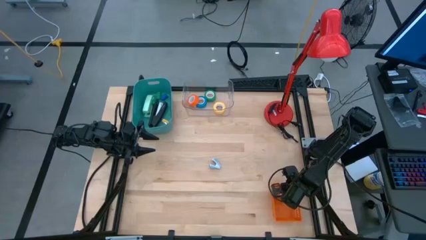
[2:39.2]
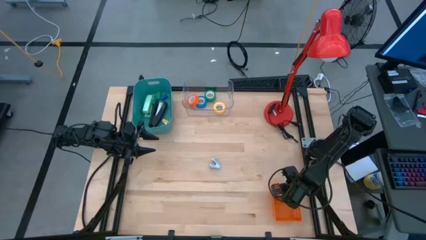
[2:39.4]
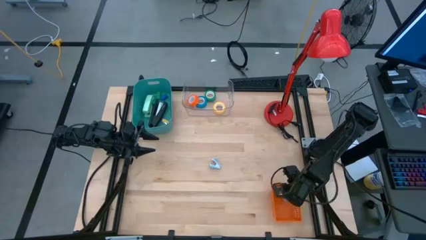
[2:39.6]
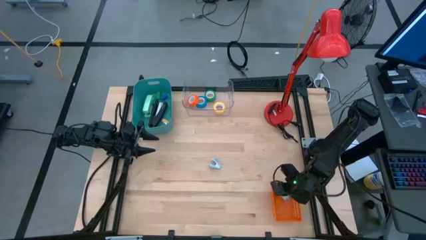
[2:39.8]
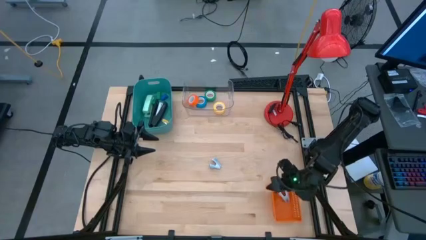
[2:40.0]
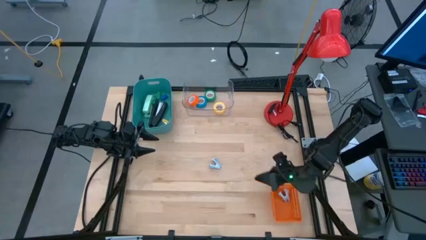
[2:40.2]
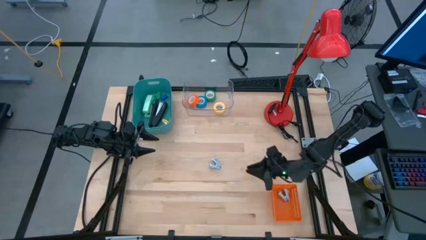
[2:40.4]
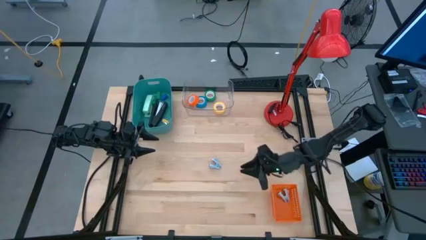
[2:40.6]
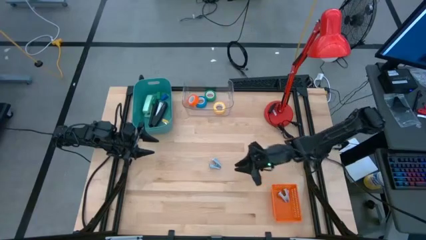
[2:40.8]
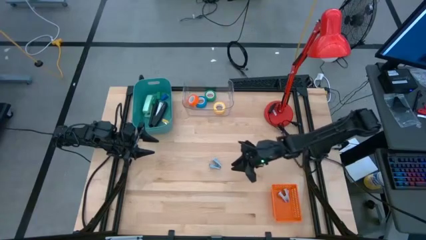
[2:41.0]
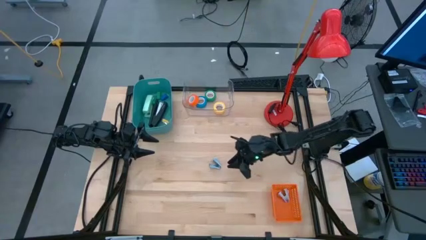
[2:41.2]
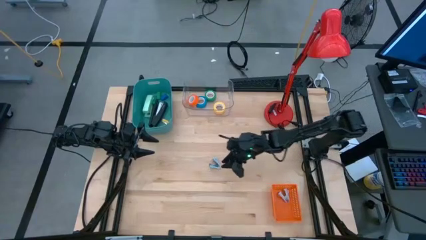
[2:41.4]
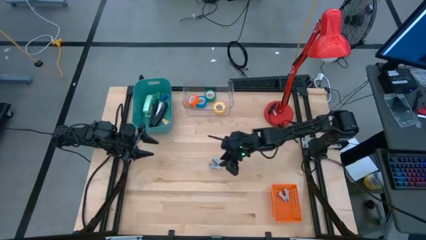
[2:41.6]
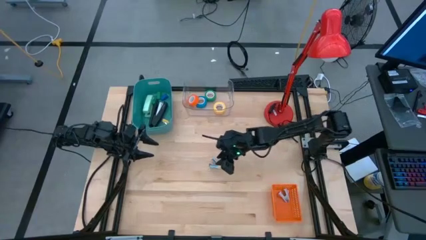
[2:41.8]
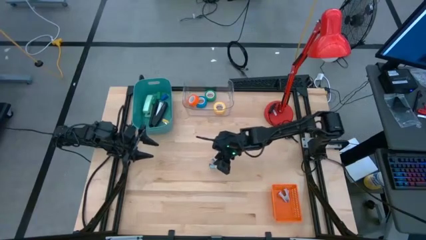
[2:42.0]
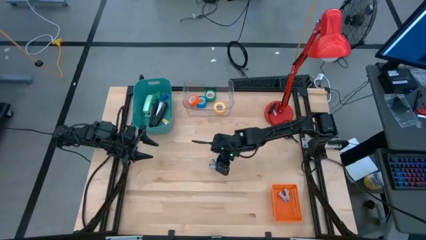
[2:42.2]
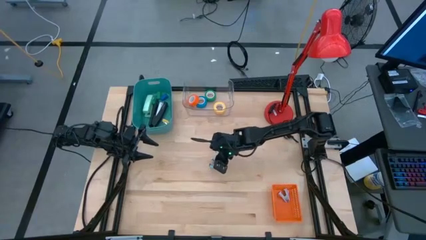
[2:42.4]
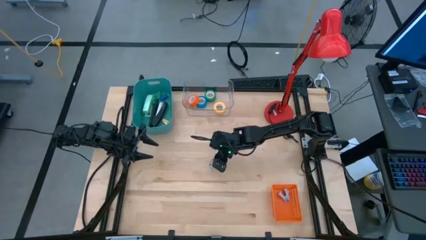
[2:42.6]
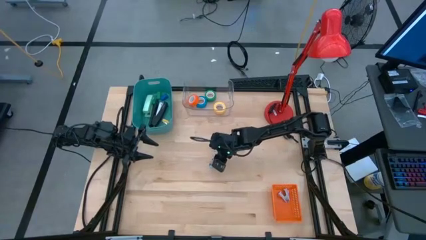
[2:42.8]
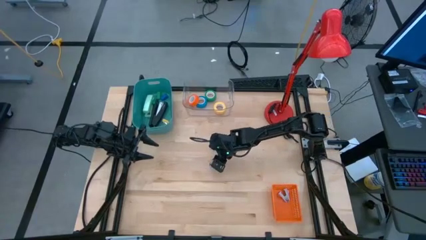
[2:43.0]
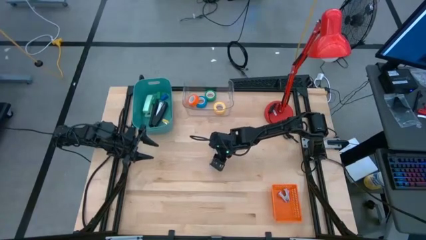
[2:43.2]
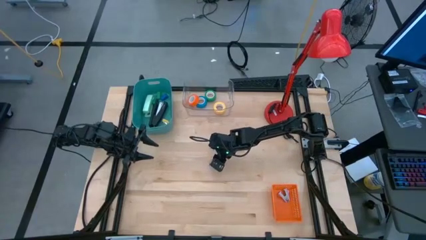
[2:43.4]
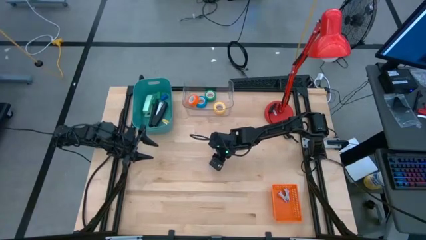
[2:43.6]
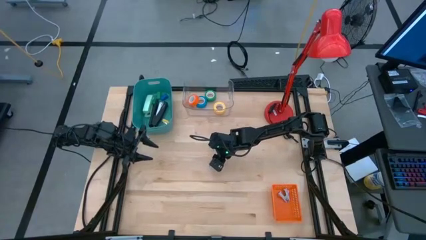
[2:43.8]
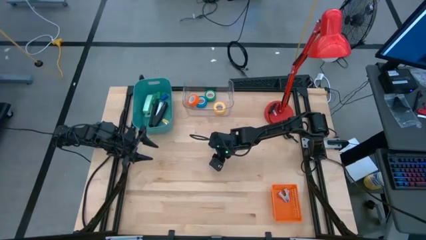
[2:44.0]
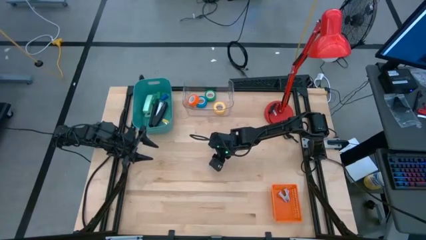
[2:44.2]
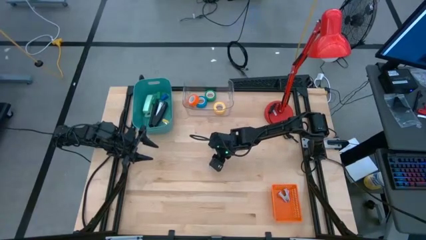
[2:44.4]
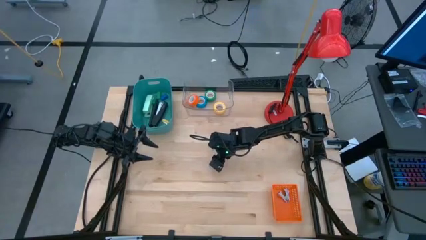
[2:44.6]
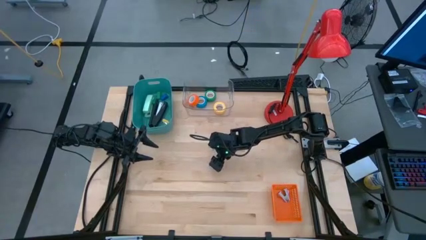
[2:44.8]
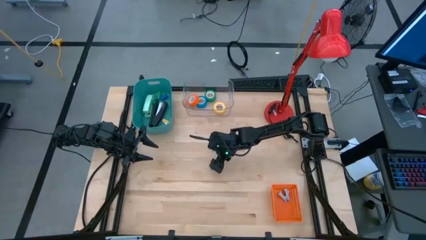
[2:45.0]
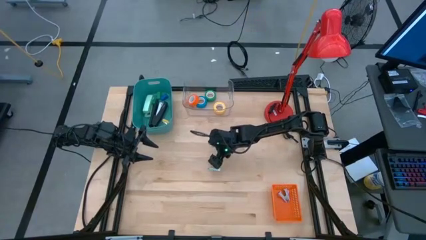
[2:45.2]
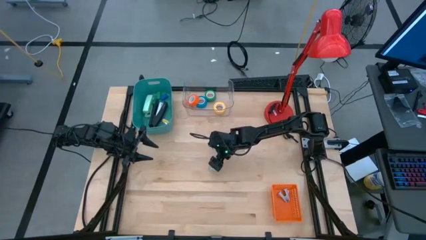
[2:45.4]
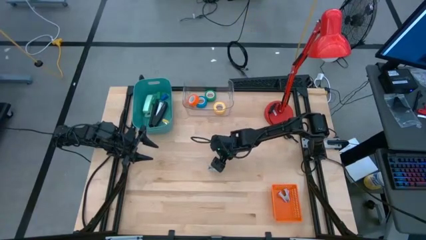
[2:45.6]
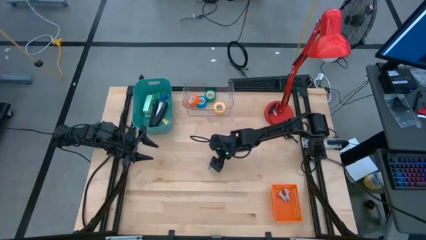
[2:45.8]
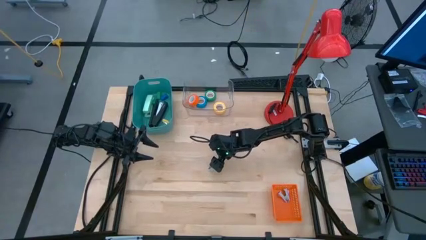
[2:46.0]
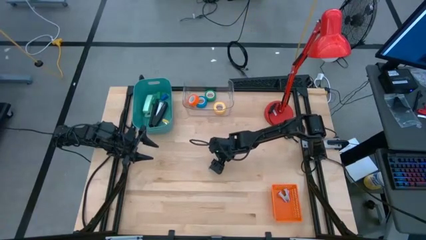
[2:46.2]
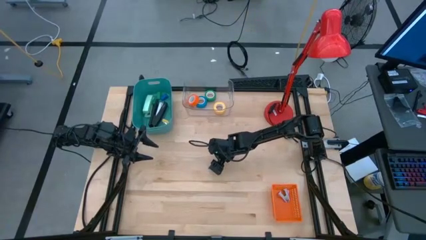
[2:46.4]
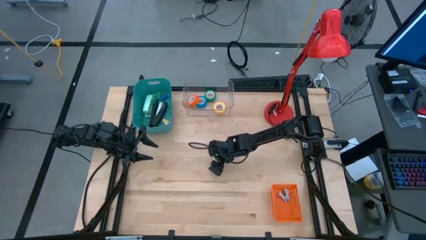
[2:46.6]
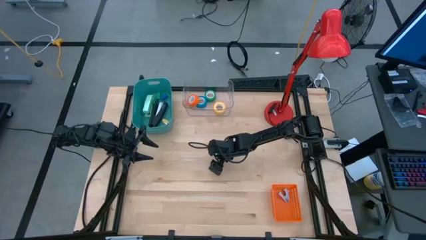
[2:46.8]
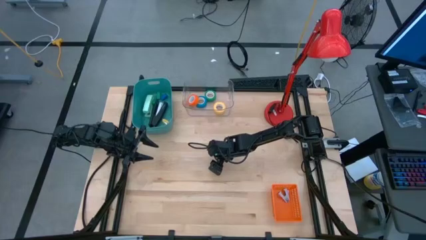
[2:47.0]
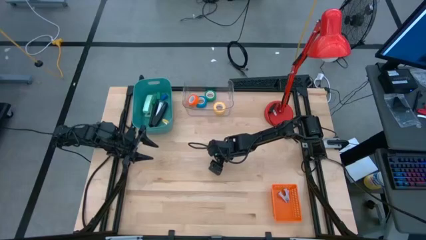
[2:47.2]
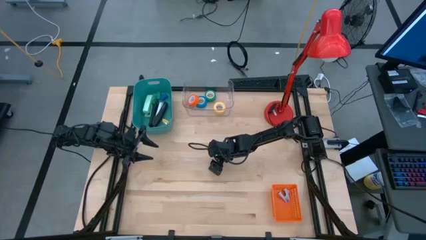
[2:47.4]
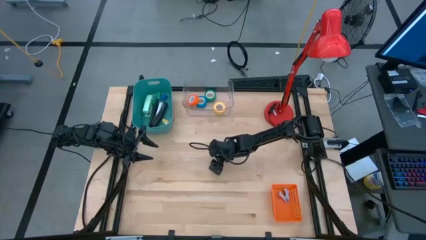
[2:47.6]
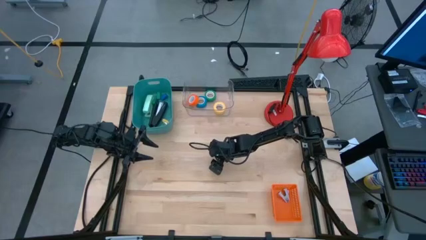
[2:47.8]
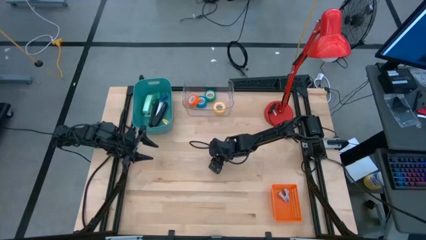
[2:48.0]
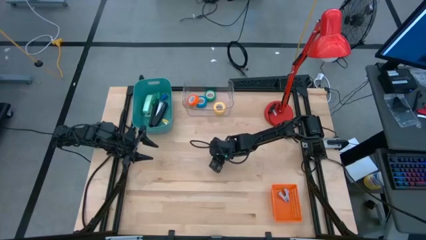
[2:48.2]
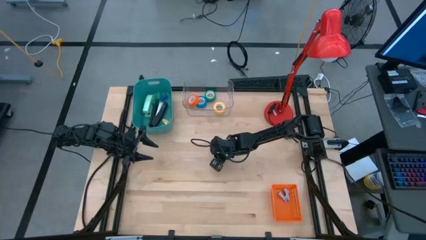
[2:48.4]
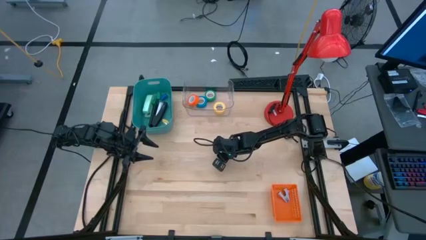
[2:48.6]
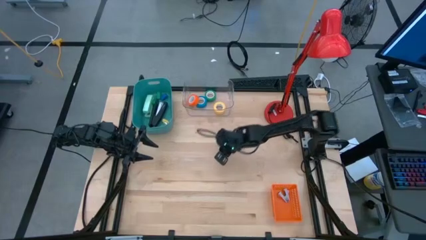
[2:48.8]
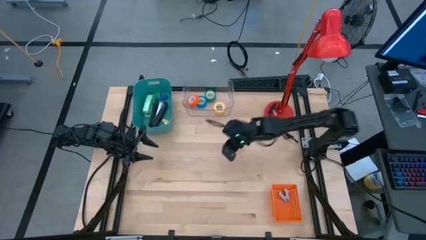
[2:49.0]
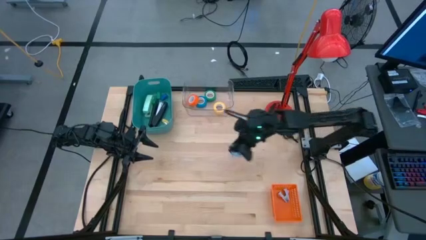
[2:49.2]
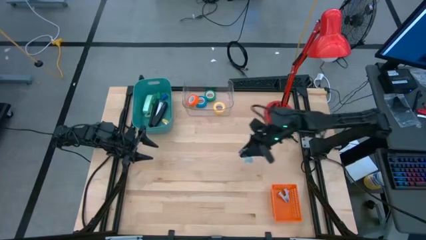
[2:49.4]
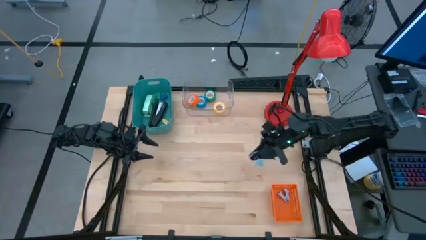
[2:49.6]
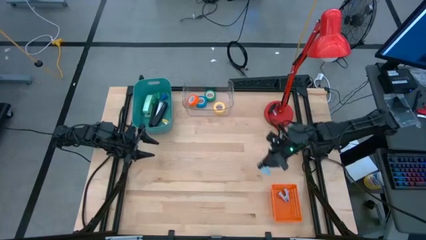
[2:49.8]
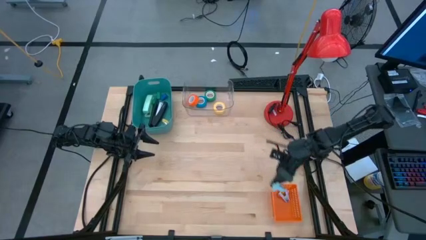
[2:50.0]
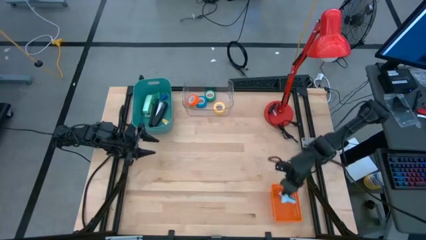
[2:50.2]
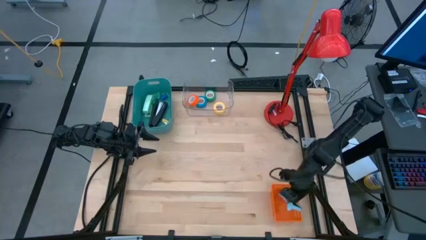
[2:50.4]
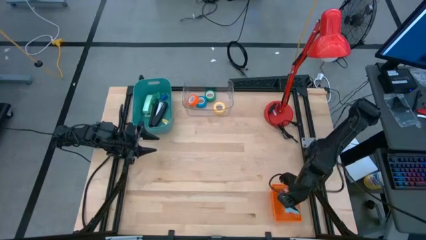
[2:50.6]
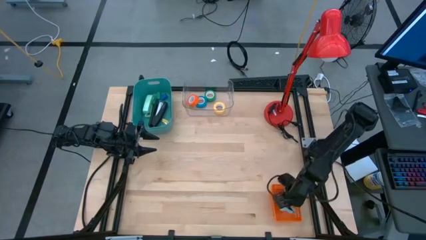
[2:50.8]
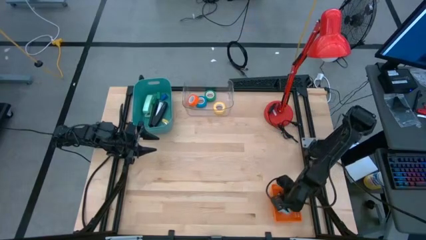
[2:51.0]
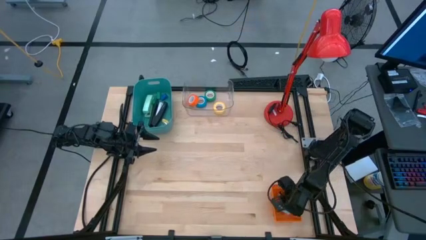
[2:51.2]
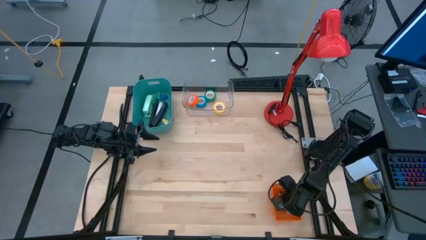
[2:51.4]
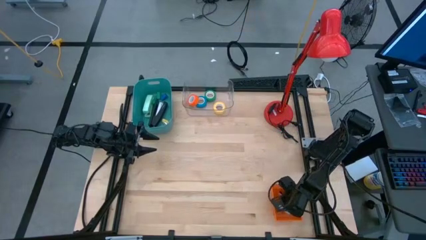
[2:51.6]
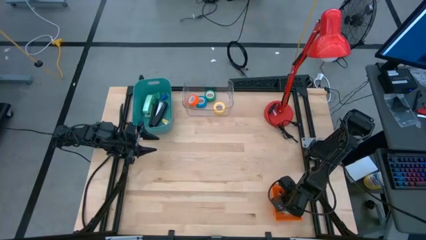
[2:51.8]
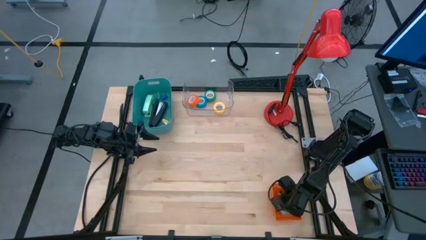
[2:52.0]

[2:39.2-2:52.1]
Task: Pick and place Stapler, Stapler remover, tape
Put the blue stapler remover into the orange basket

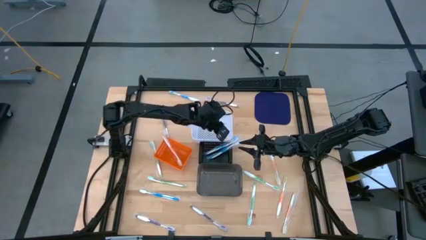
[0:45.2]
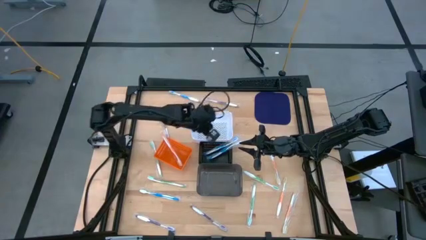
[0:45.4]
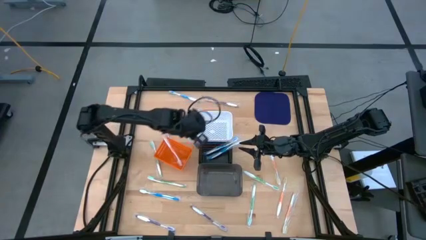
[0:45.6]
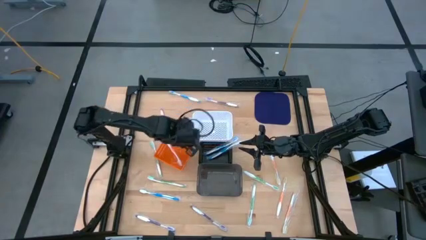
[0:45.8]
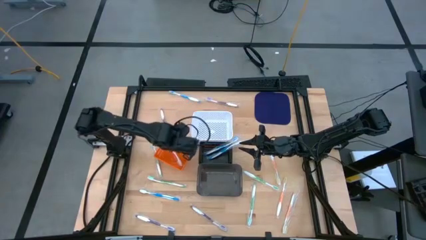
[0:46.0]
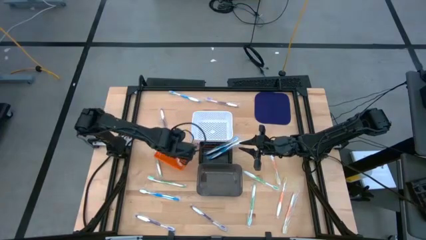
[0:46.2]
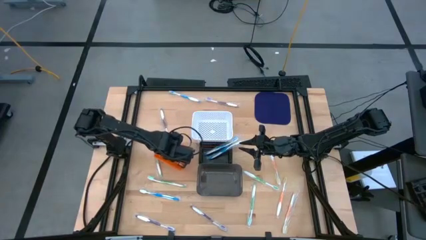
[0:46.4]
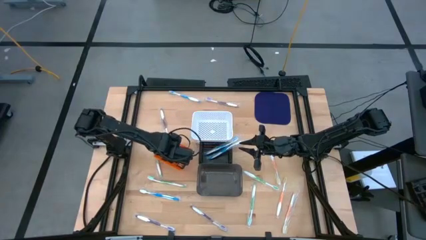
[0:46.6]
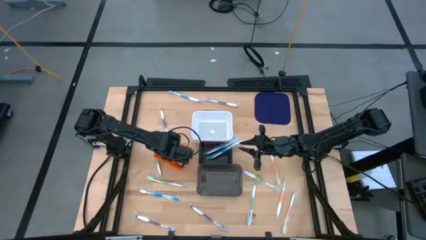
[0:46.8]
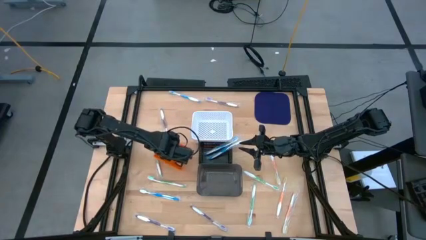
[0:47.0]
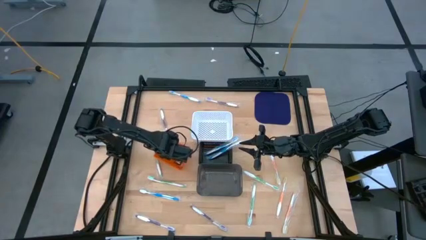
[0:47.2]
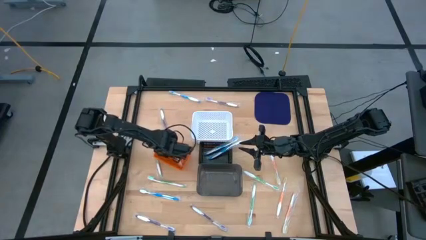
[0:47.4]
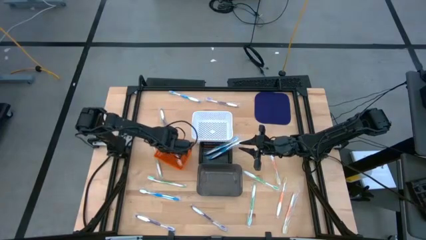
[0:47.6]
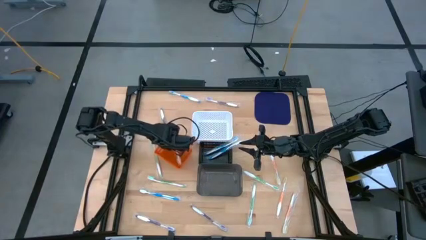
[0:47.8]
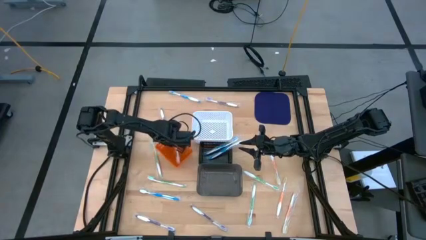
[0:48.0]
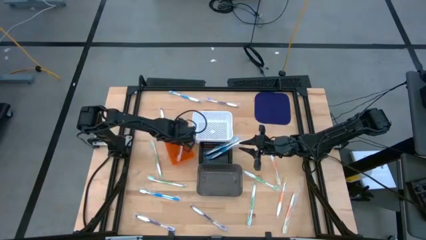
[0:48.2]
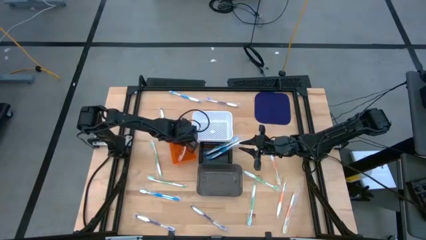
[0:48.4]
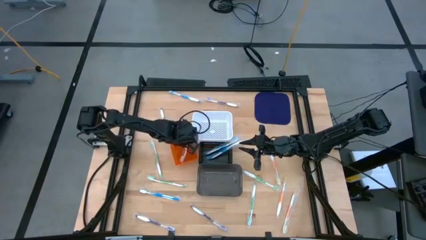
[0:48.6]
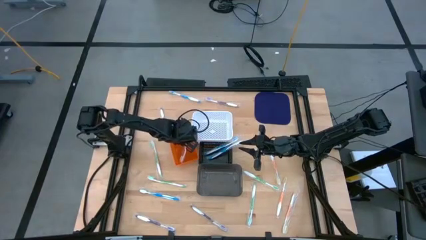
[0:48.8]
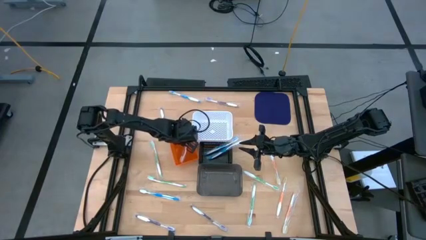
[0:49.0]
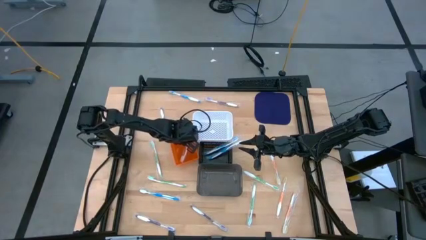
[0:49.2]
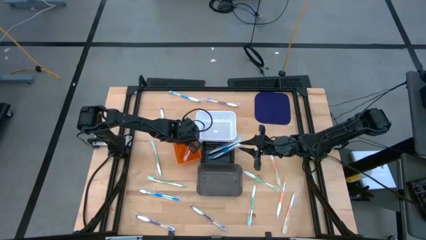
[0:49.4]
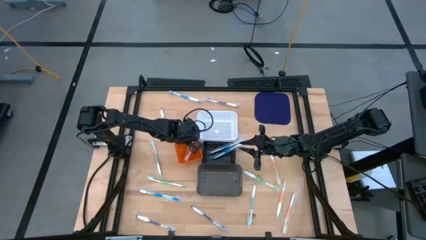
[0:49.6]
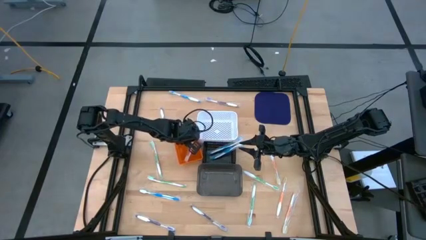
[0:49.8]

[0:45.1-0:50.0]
Task: Pick & Place Toothbrushes
Adjust the orange basket on the table
